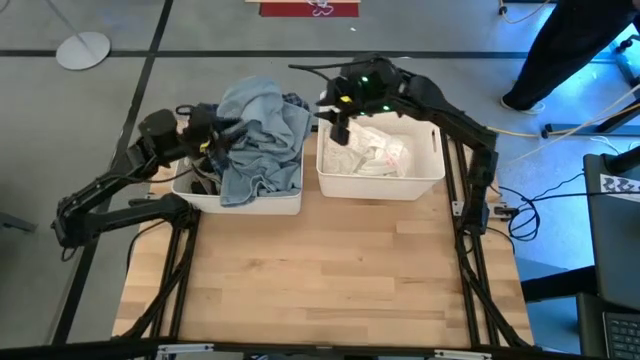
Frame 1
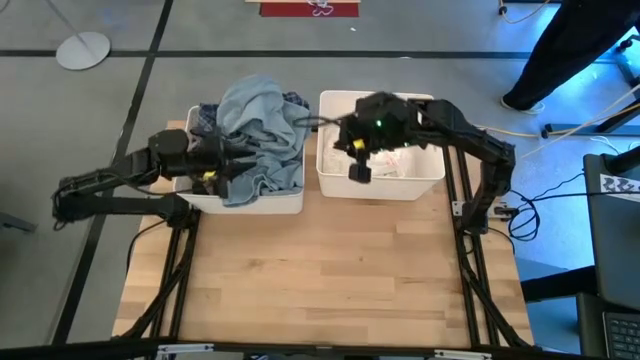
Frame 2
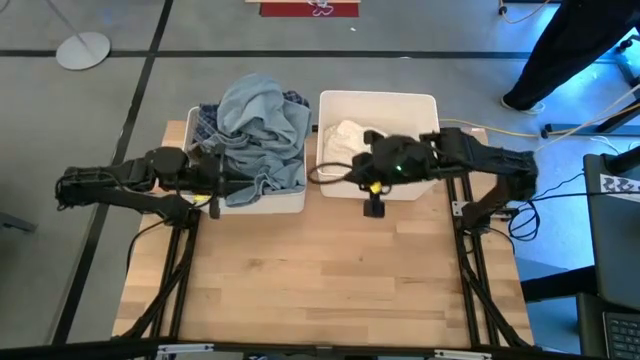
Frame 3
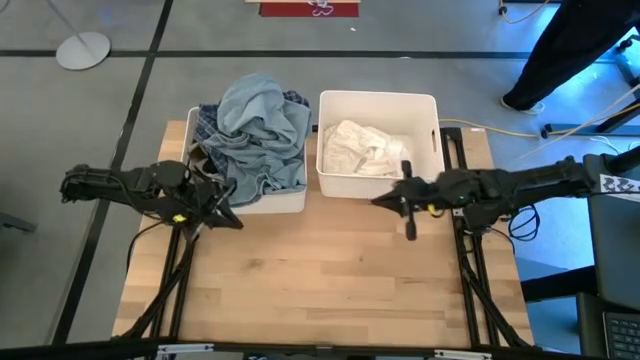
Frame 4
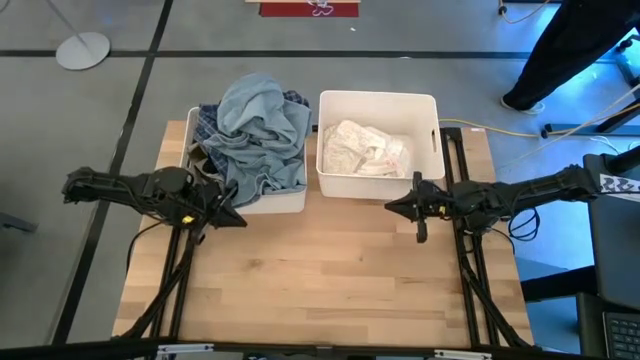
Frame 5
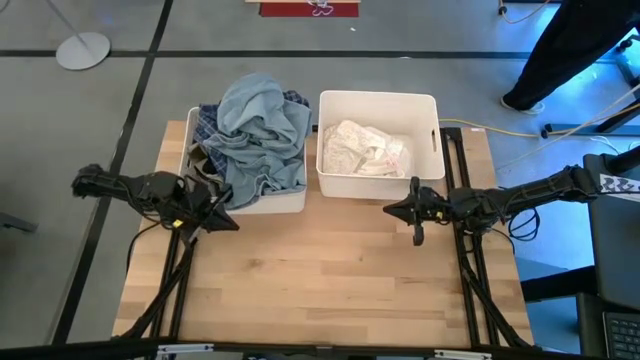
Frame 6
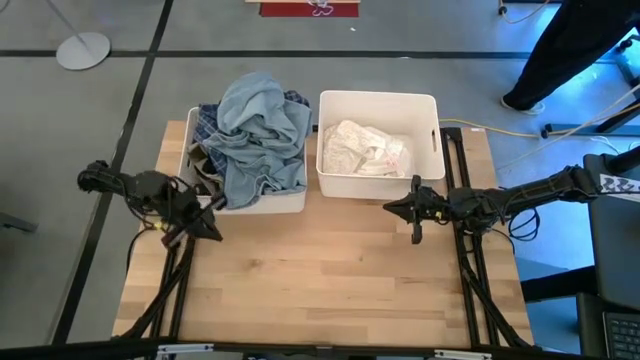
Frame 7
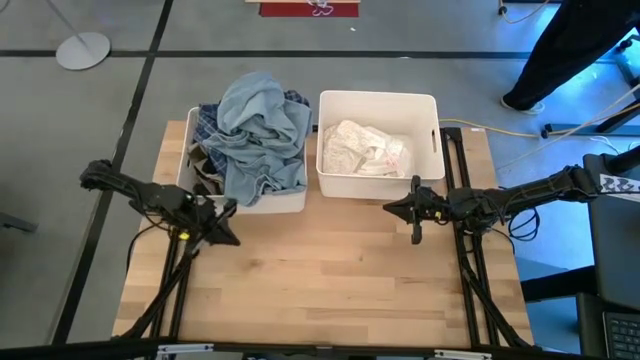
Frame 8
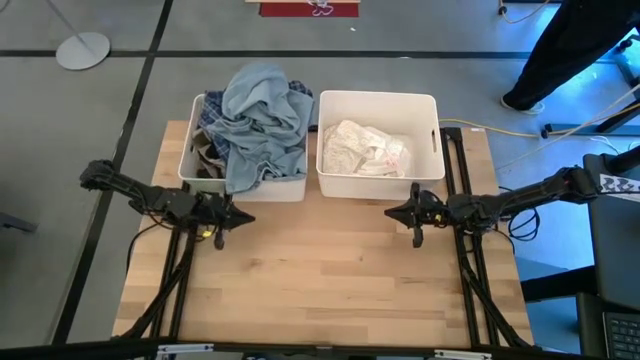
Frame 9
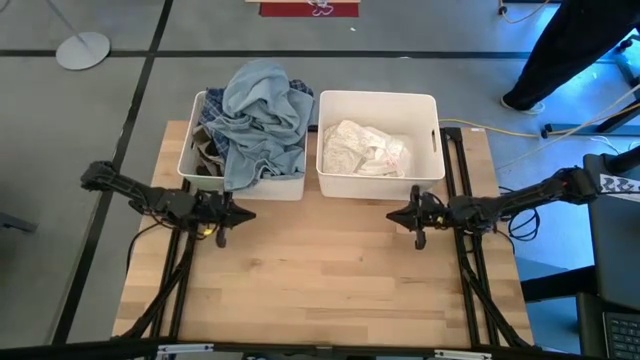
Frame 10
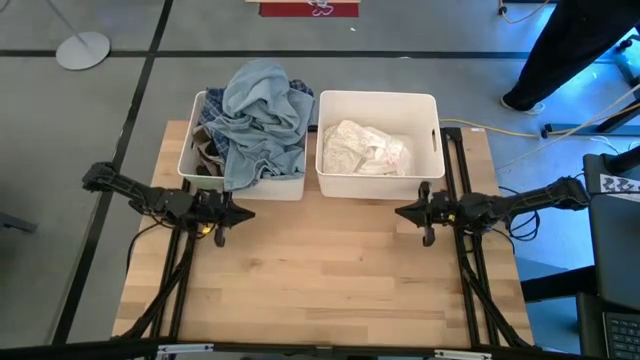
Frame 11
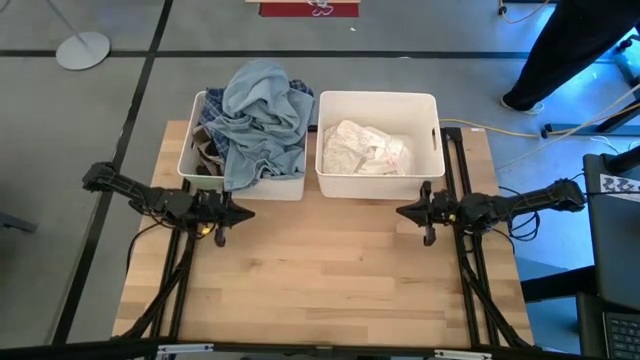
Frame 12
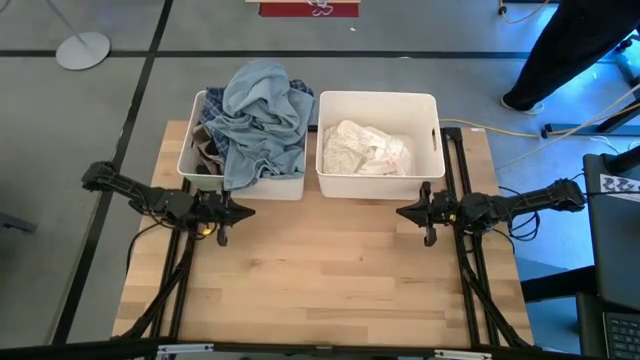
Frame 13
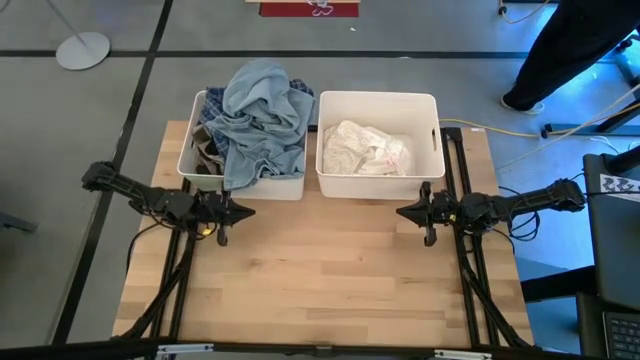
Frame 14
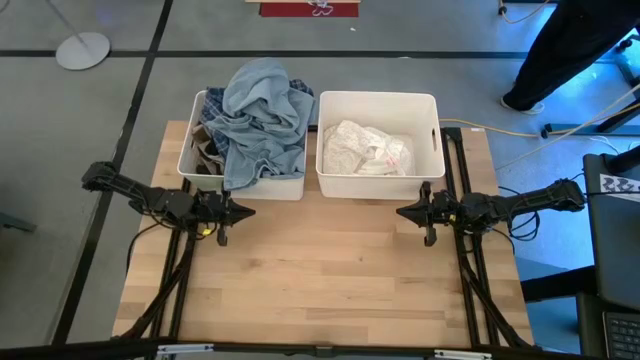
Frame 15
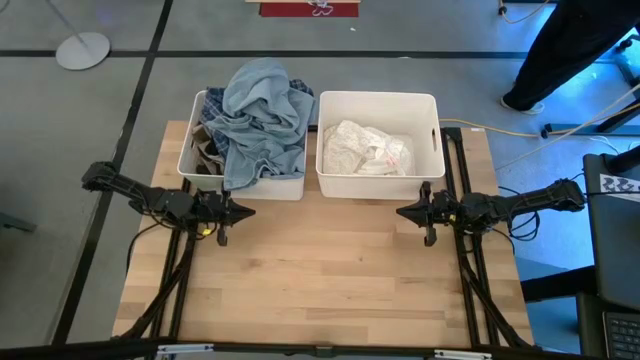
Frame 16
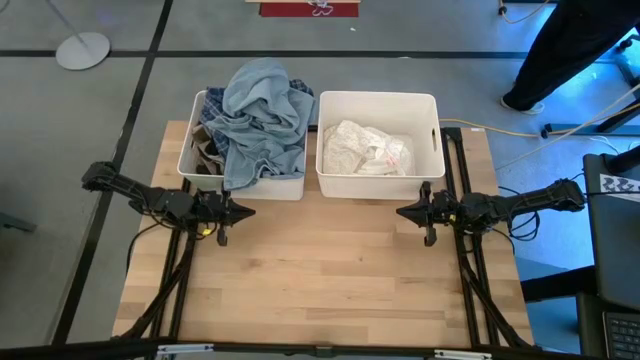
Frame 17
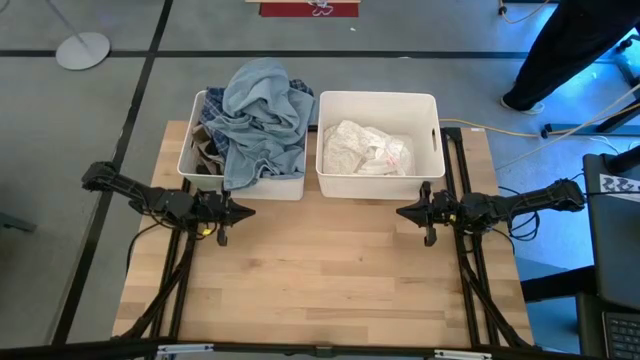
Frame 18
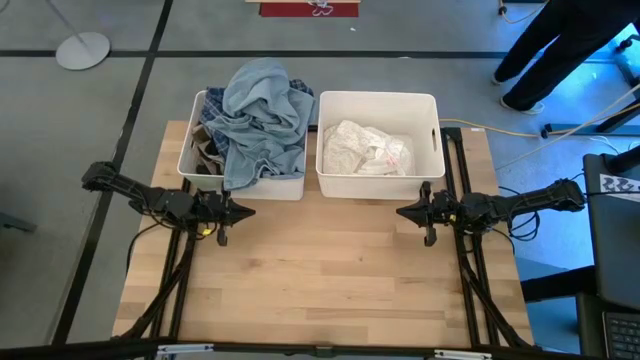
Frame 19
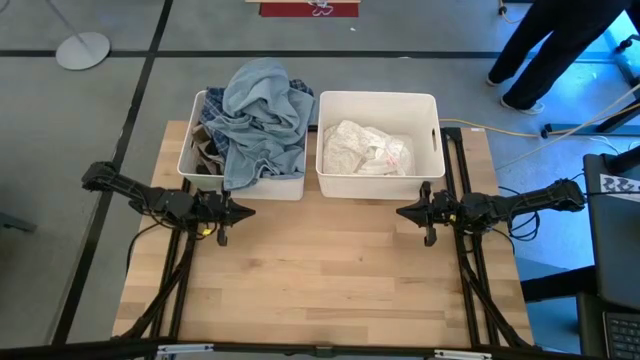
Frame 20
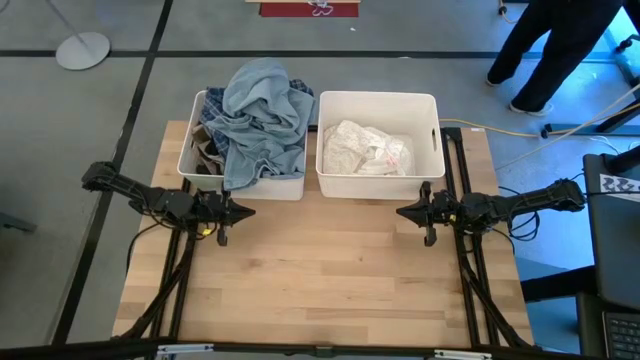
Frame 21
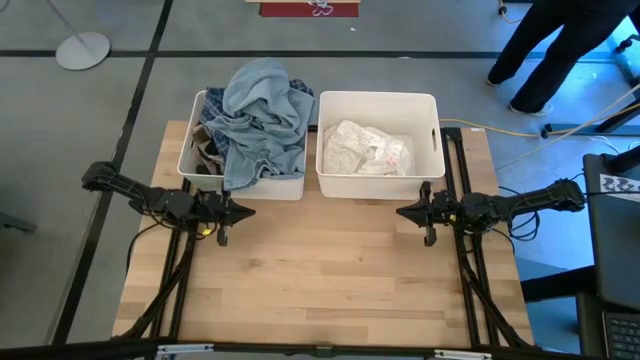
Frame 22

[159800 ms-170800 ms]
Task: Sort clothes
Return to Home Position

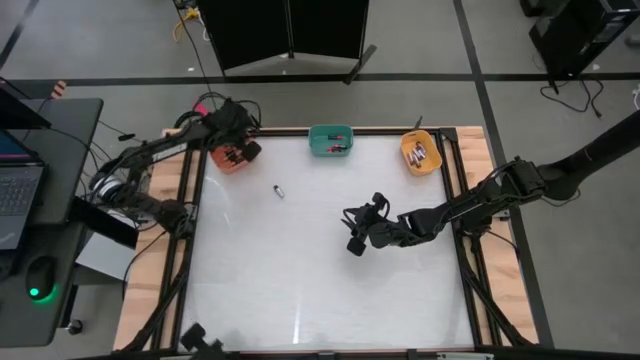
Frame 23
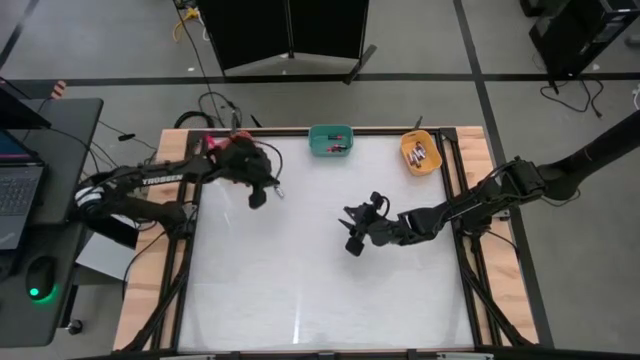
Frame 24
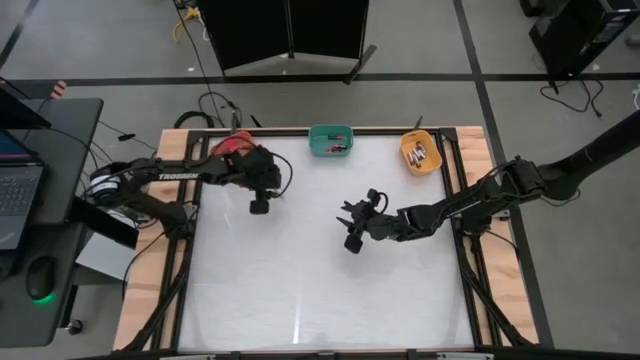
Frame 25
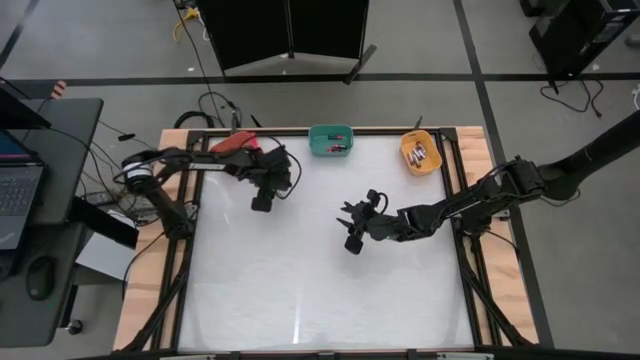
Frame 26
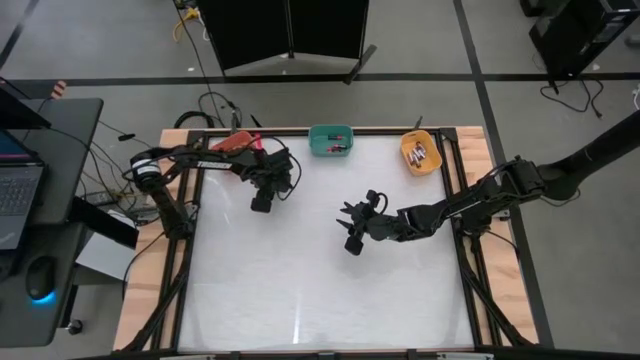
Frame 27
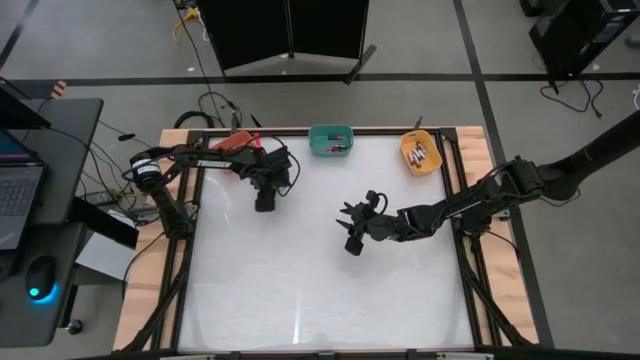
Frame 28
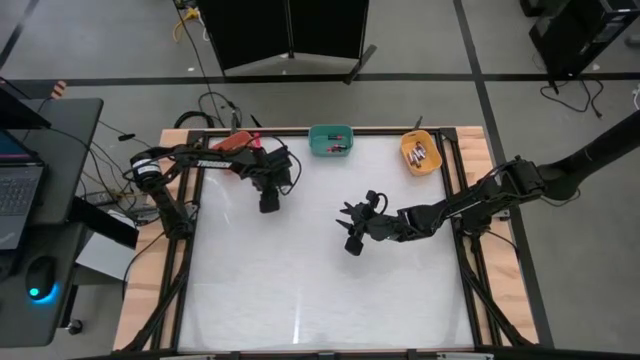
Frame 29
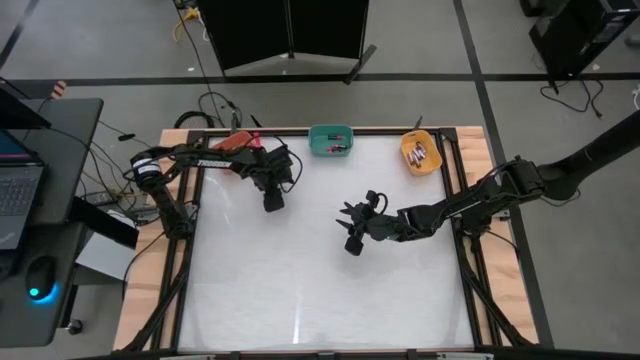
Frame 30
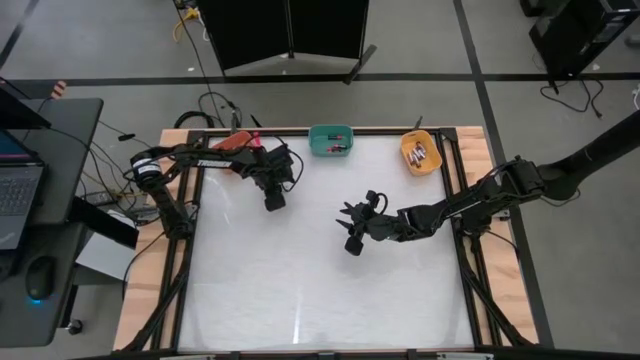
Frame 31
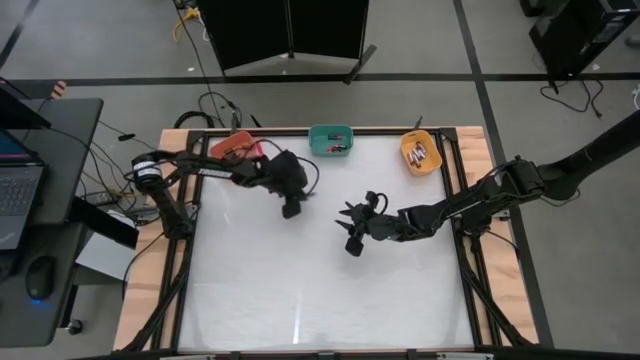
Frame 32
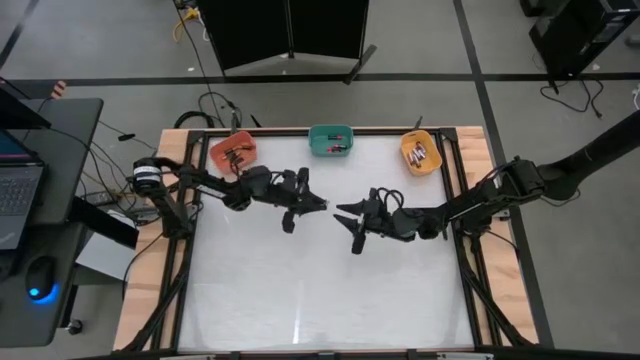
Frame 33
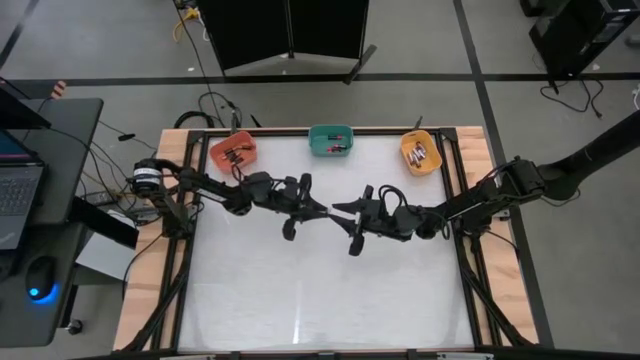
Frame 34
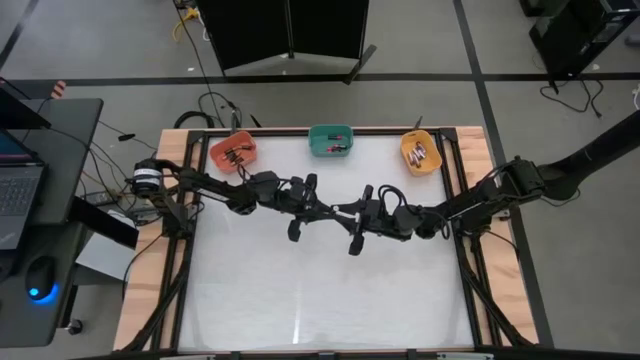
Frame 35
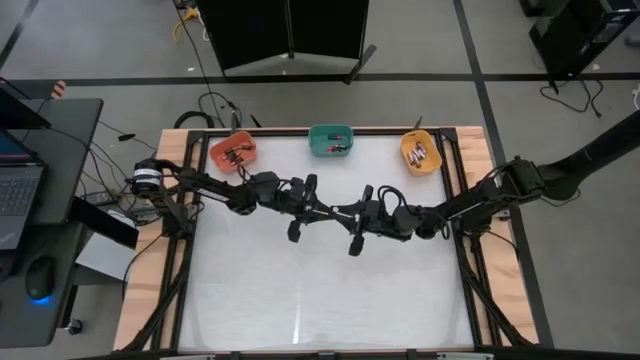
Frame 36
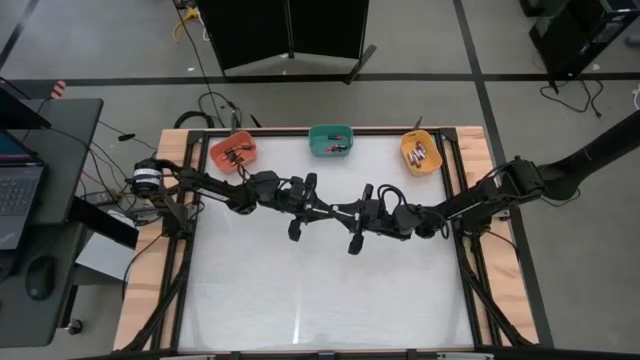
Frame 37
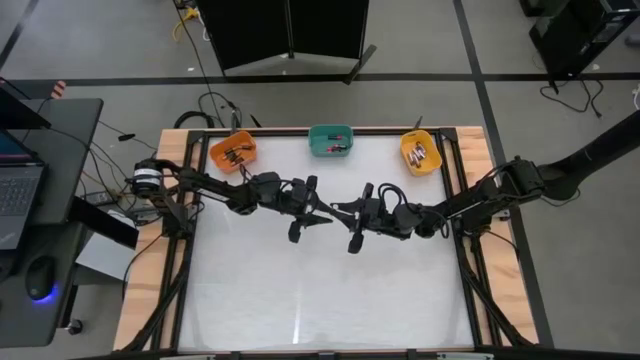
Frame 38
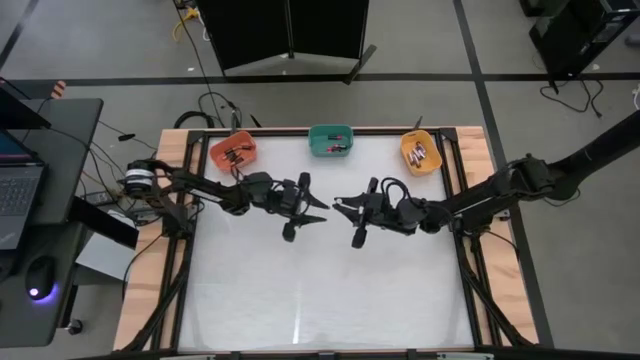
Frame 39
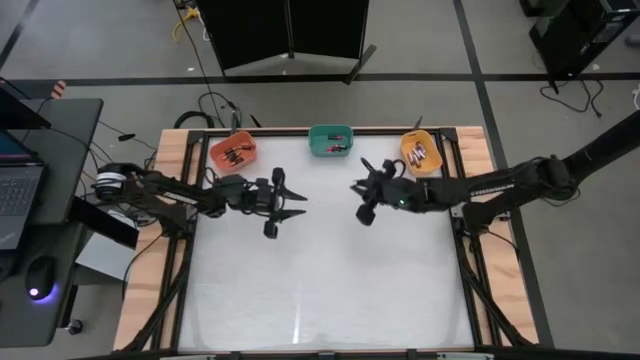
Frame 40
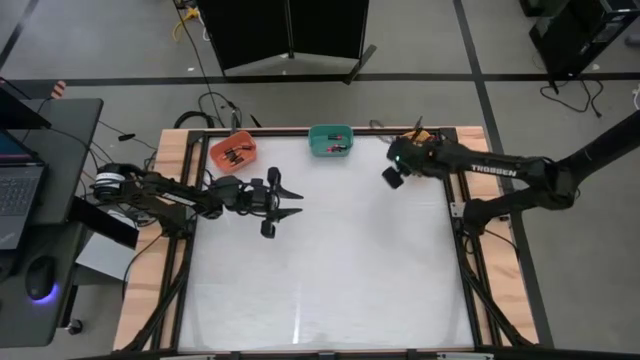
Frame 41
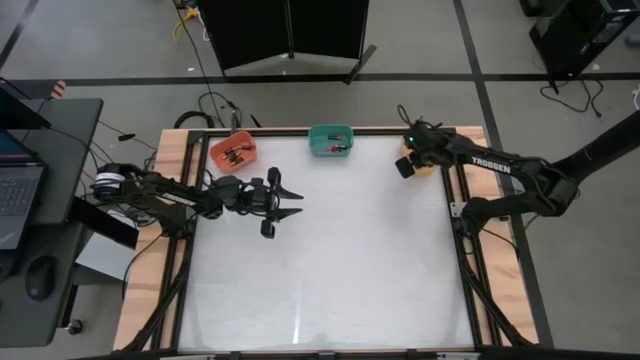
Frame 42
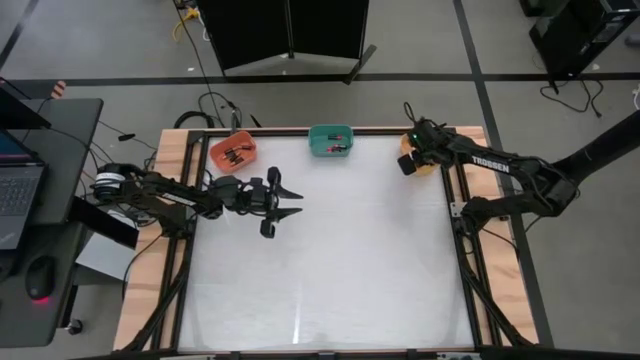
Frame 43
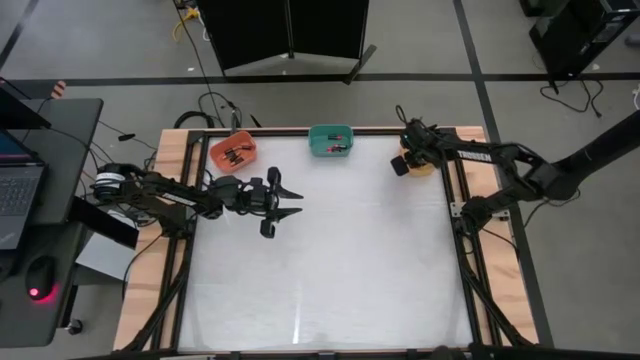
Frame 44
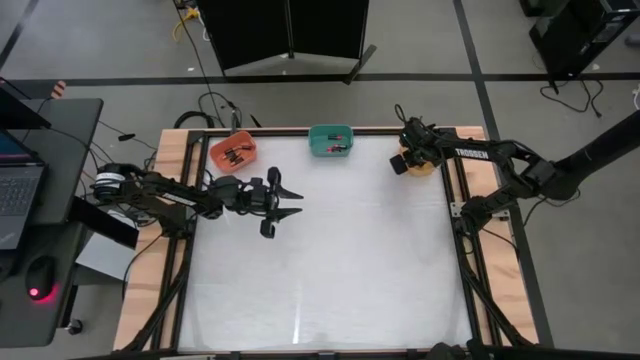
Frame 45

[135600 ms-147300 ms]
Task: Sort batteries
Put the silver battery into the yellow bin
